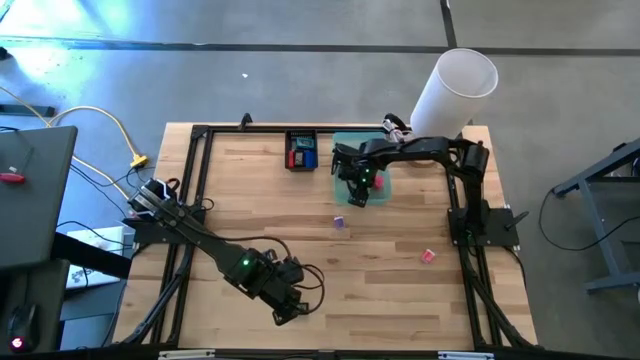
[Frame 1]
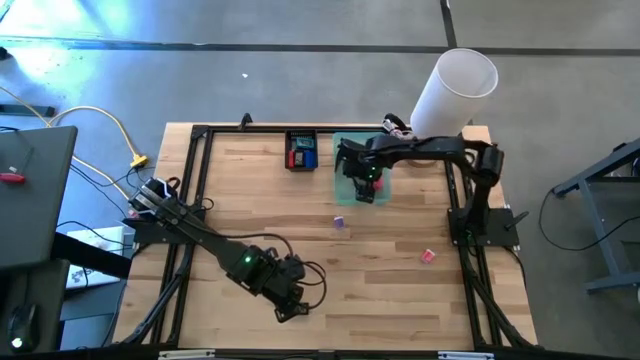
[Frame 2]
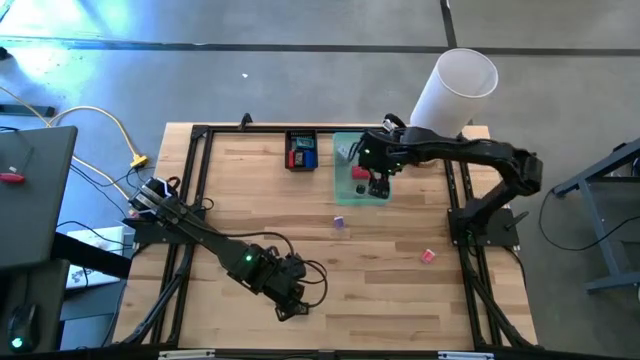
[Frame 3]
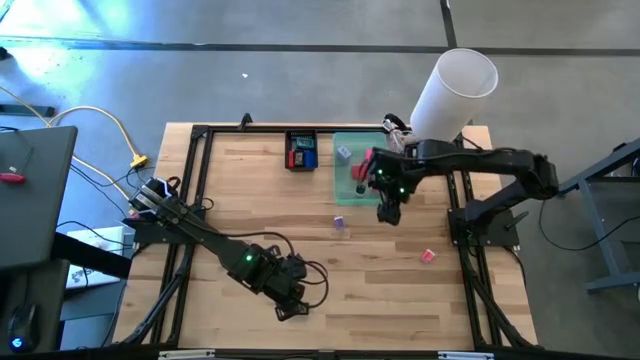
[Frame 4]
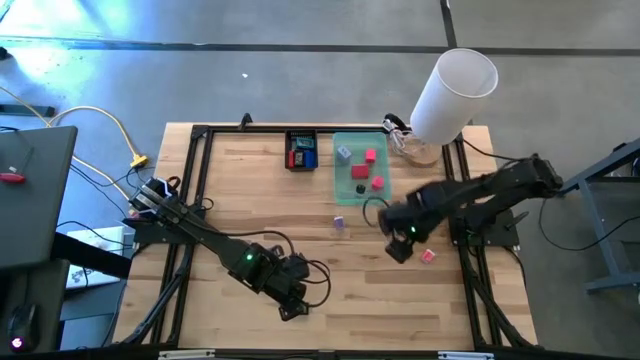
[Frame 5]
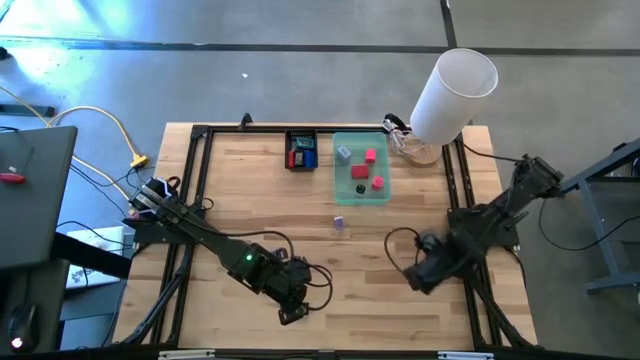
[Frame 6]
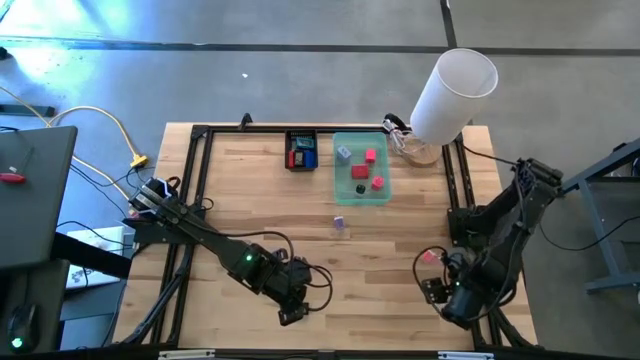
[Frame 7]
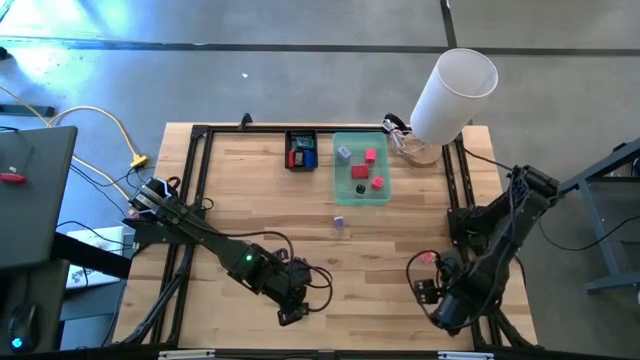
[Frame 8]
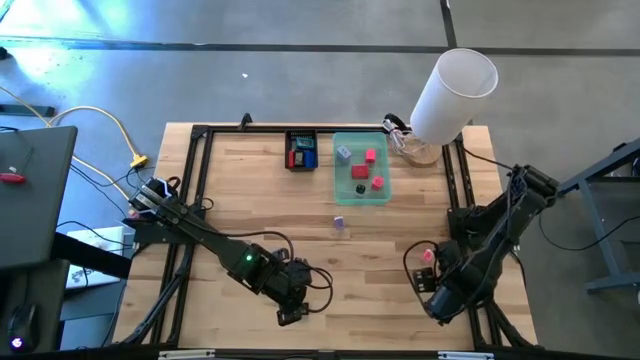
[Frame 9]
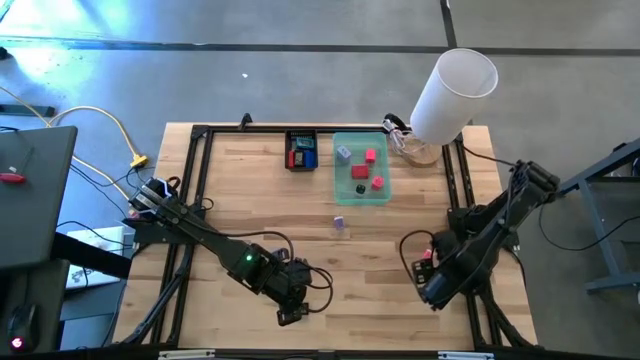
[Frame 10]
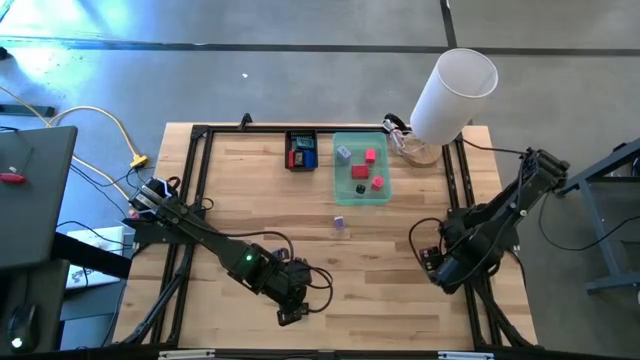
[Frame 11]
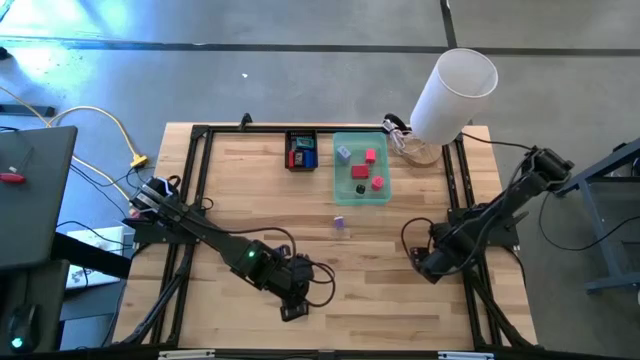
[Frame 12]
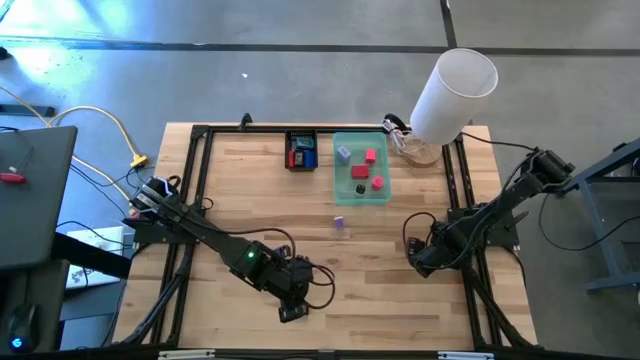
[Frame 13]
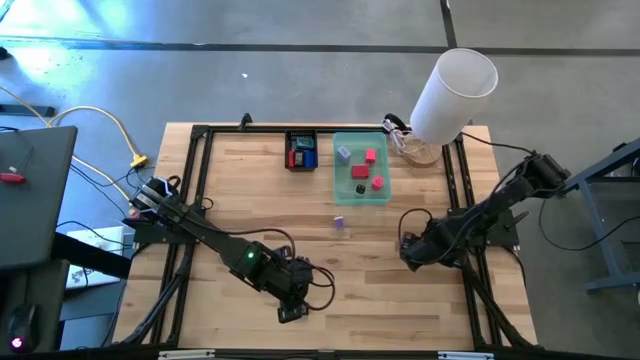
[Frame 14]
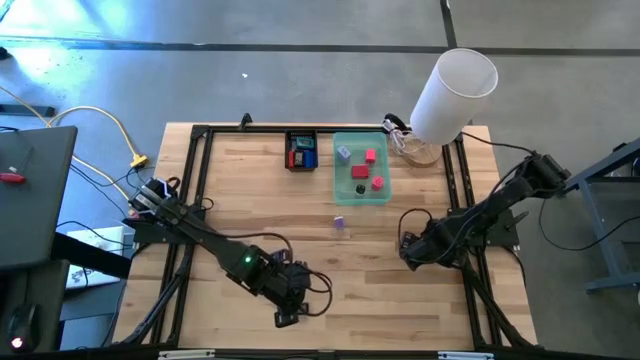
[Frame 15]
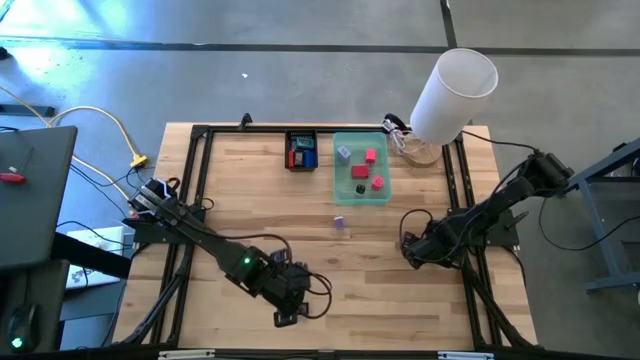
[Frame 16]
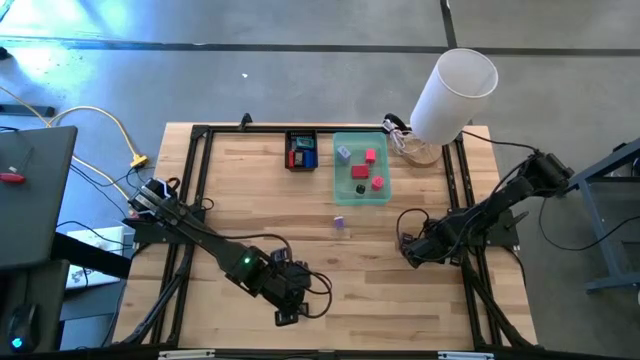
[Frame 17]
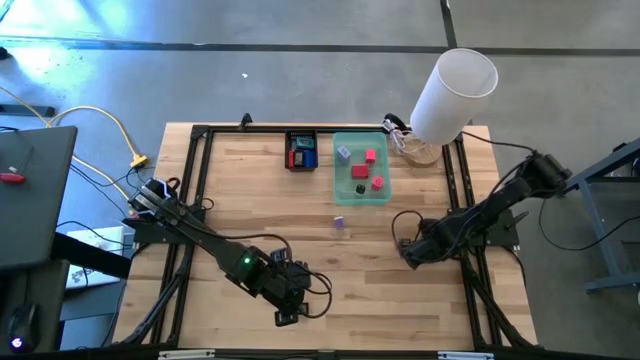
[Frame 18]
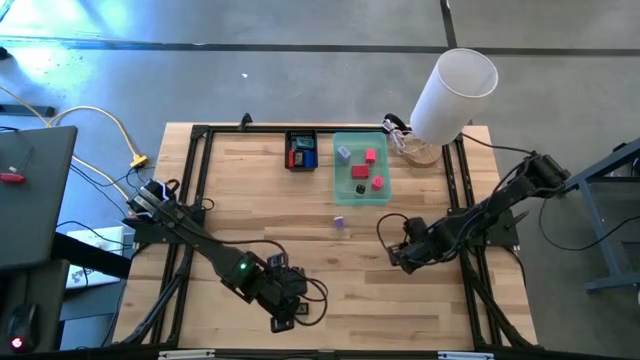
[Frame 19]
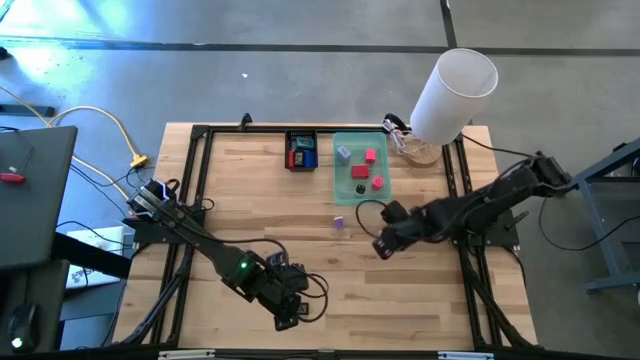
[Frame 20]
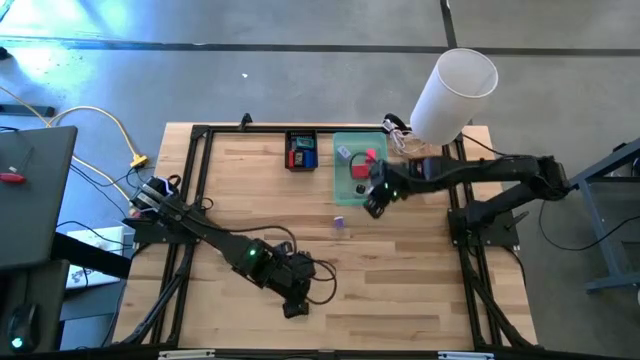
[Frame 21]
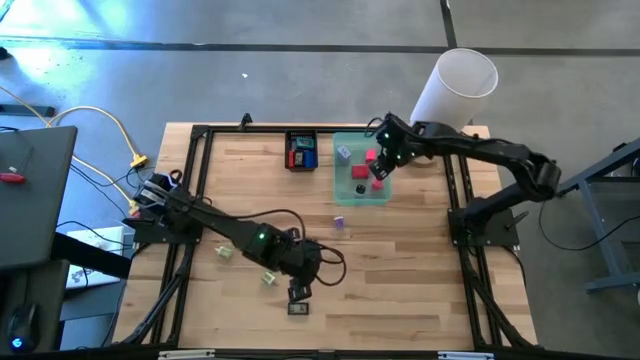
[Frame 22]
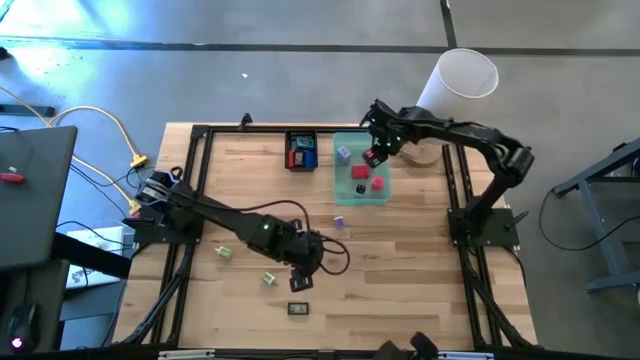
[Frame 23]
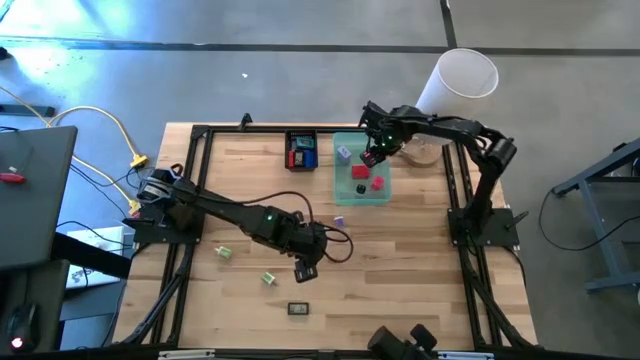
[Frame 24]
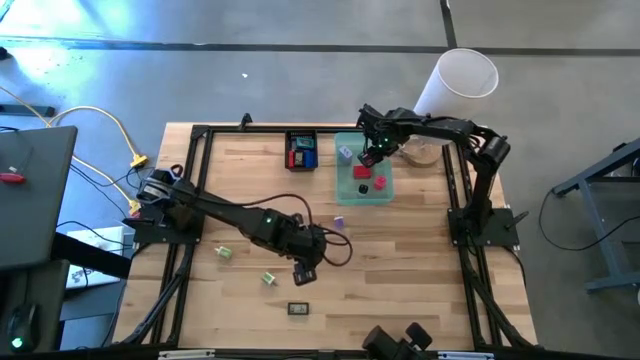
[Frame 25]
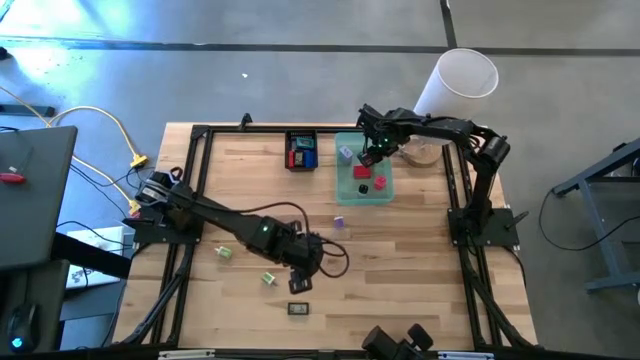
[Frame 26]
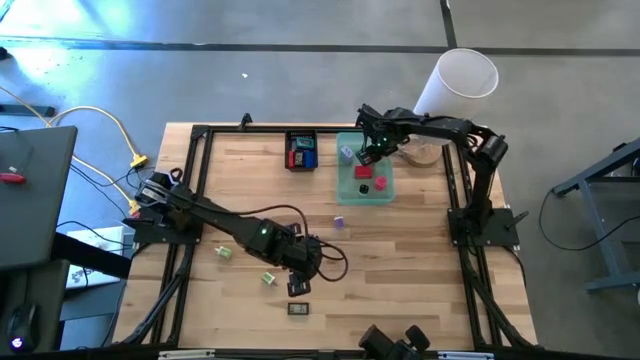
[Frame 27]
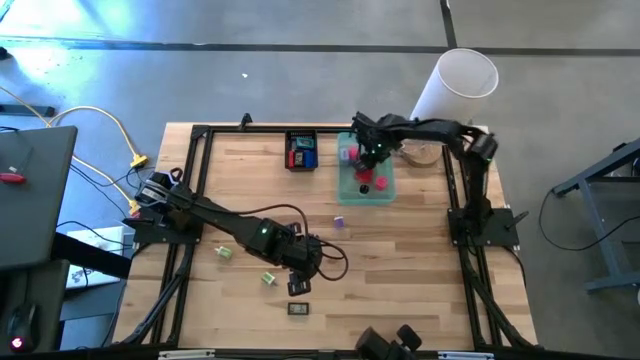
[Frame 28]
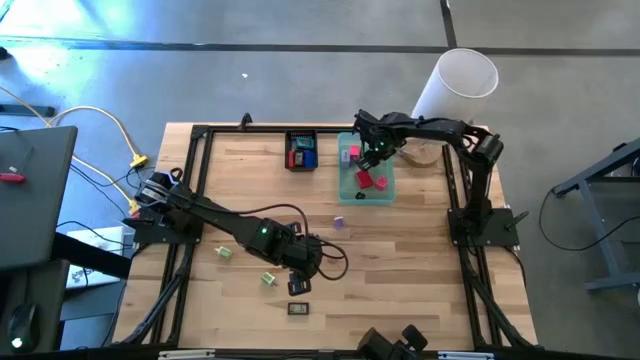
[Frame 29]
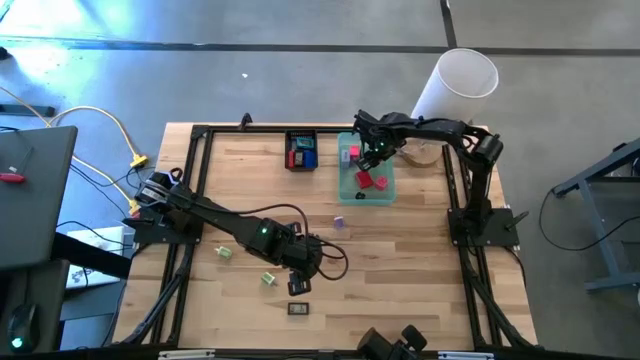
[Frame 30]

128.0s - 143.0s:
Task: Pick & Place Office items
Put the pink charger adapter into the blue bin

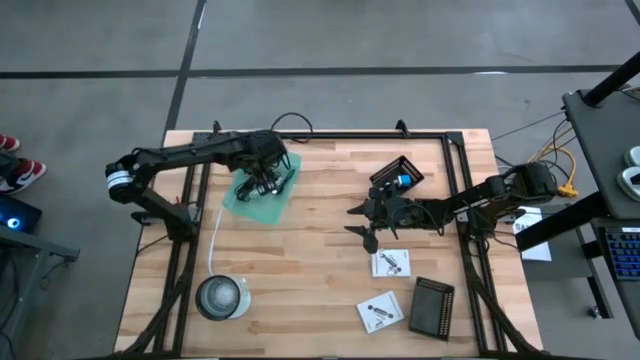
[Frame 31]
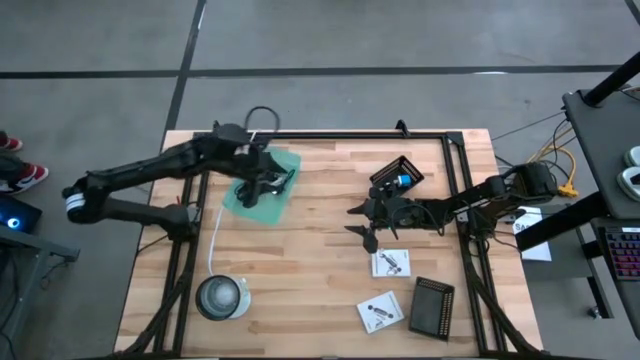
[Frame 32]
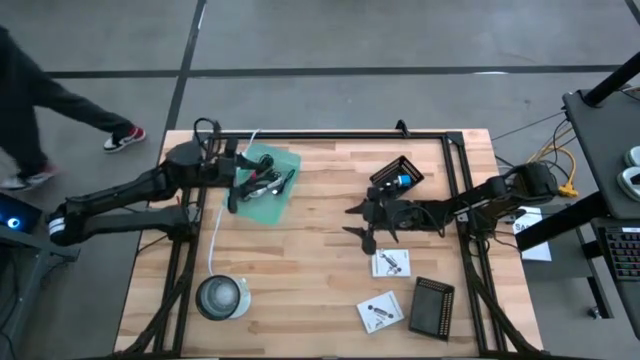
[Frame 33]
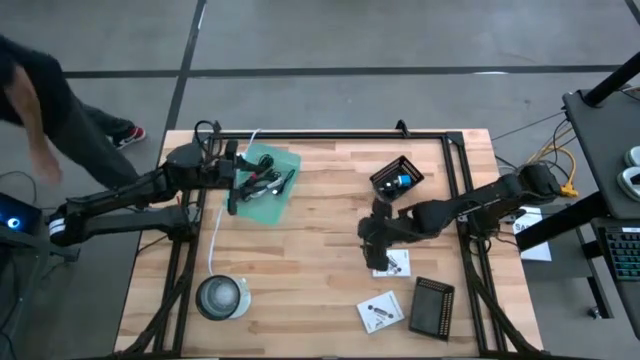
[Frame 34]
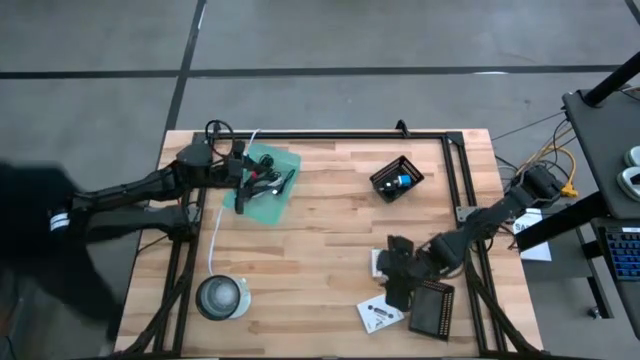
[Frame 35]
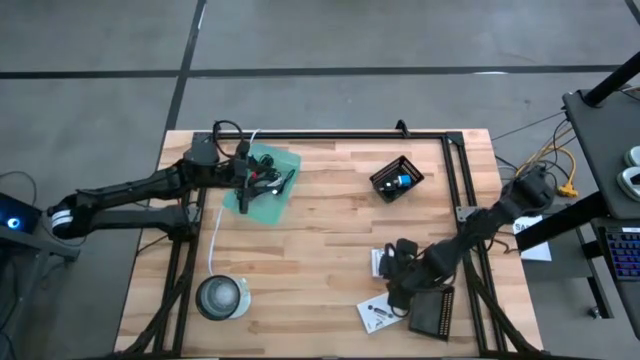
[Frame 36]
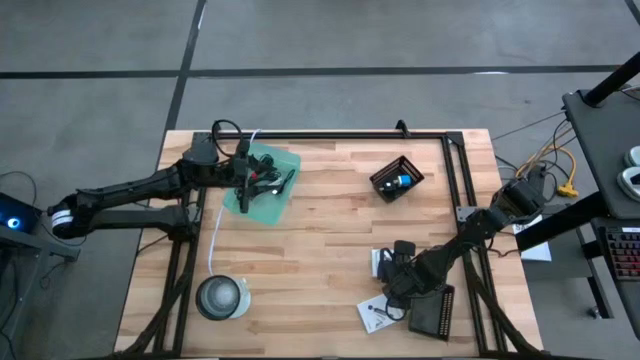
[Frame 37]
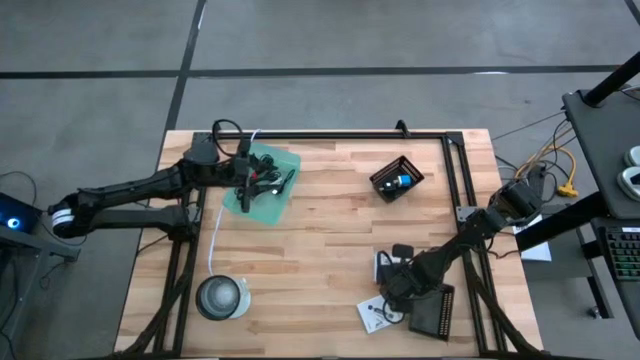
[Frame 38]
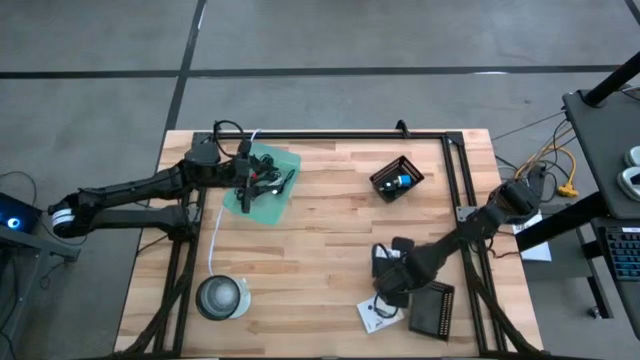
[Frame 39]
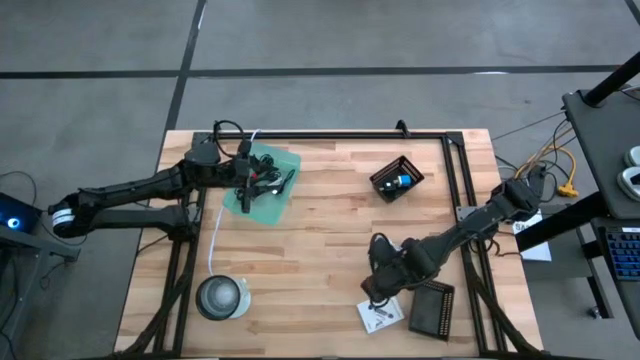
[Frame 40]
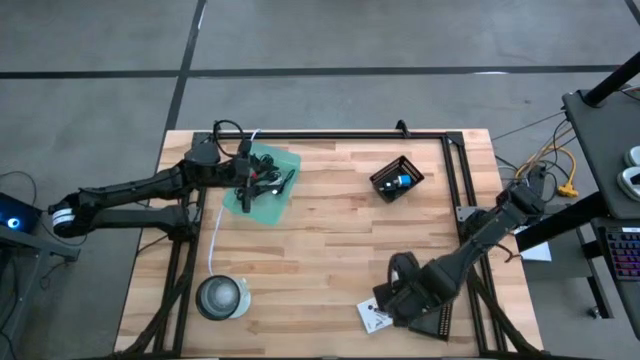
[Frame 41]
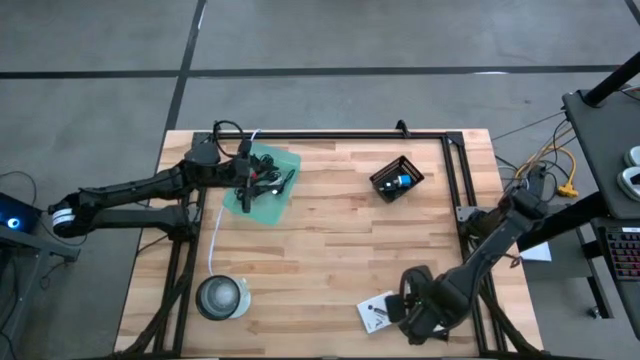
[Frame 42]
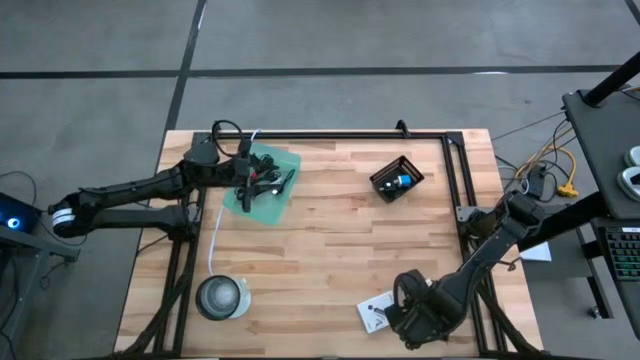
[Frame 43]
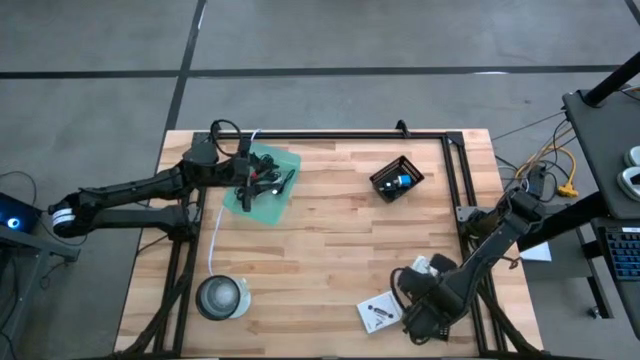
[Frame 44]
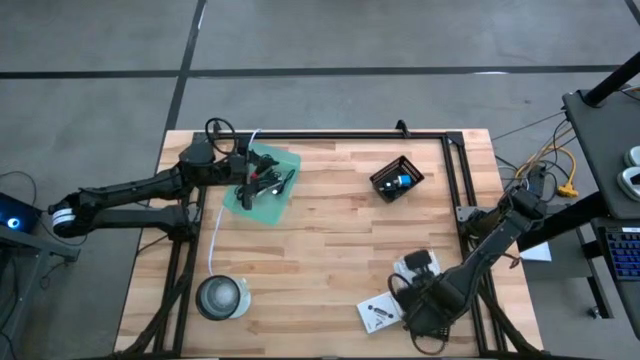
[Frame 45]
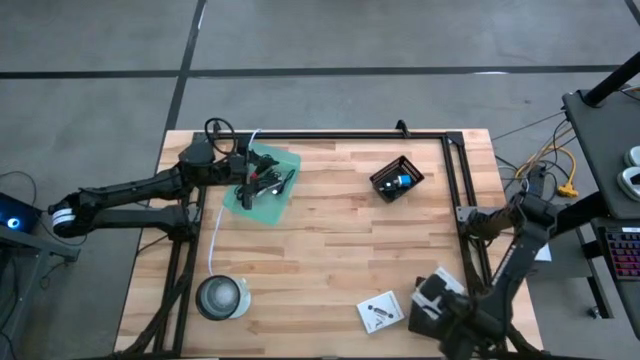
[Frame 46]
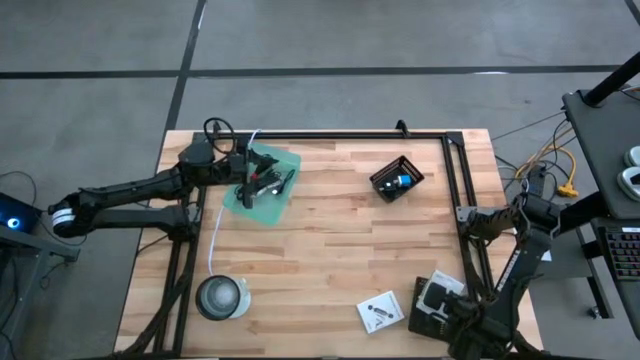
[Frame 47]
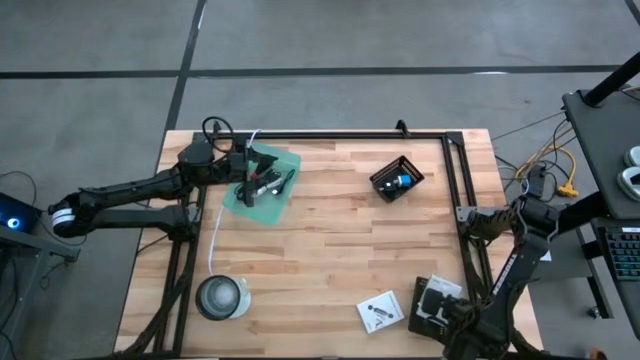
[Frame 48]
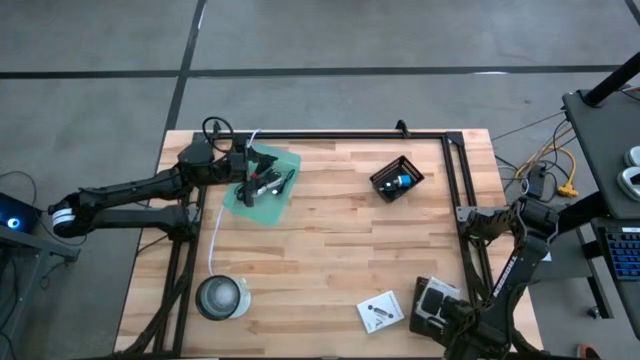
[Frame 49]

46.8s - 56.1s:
Task: Pick and place items into bin
Put the top white card reader box into the bottom black bin
